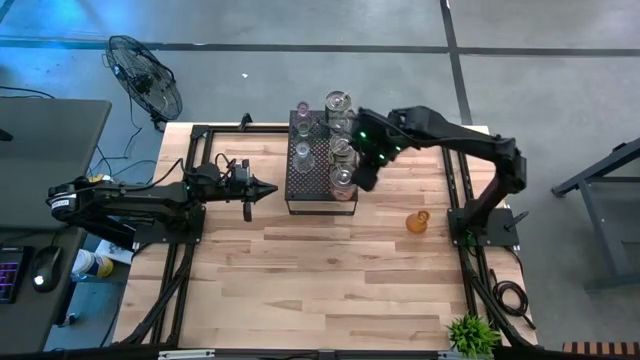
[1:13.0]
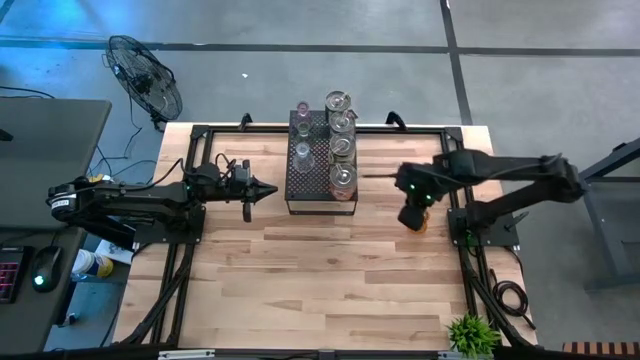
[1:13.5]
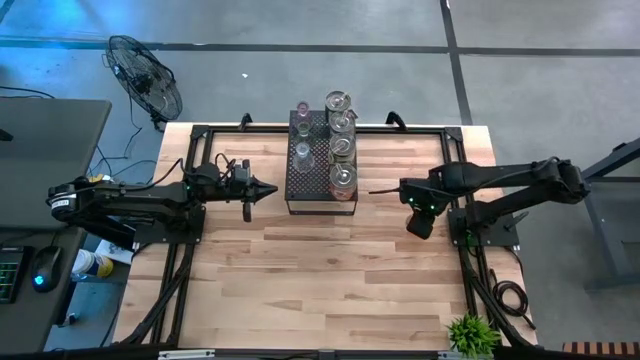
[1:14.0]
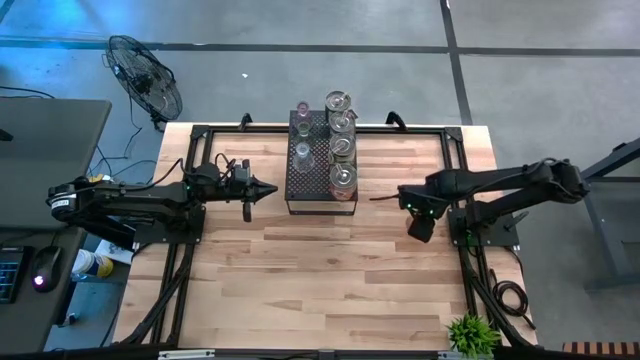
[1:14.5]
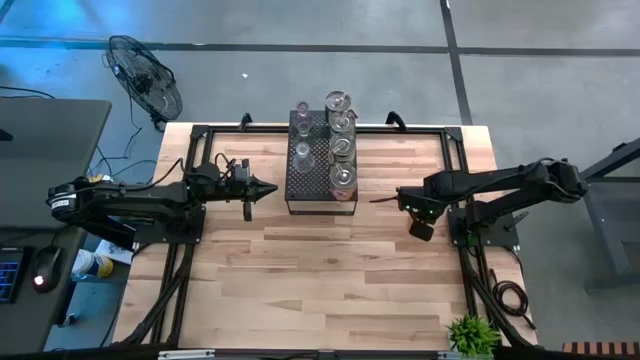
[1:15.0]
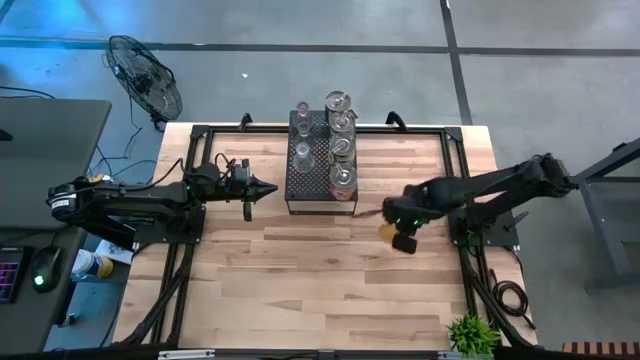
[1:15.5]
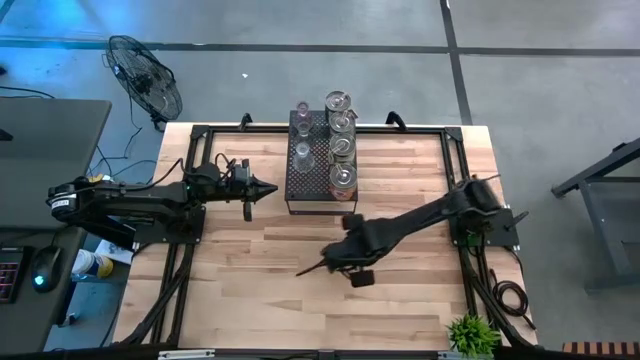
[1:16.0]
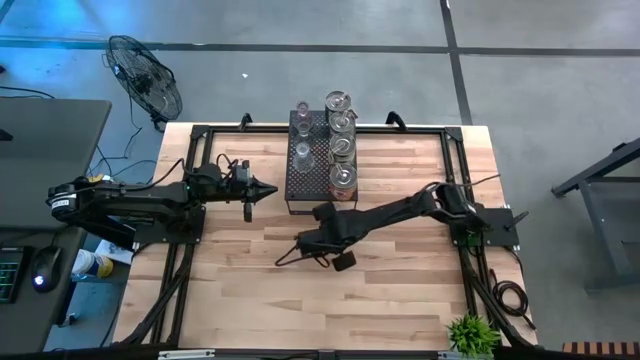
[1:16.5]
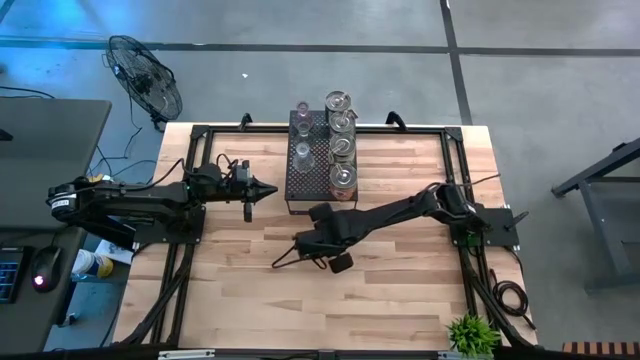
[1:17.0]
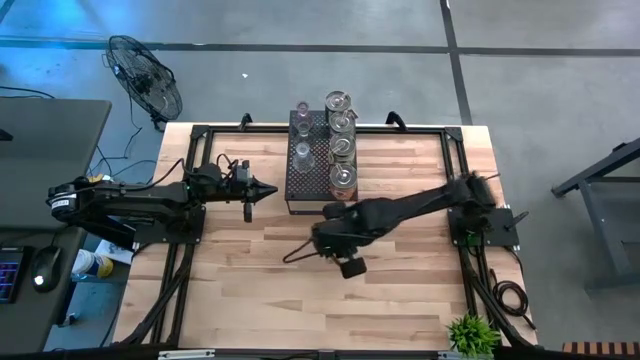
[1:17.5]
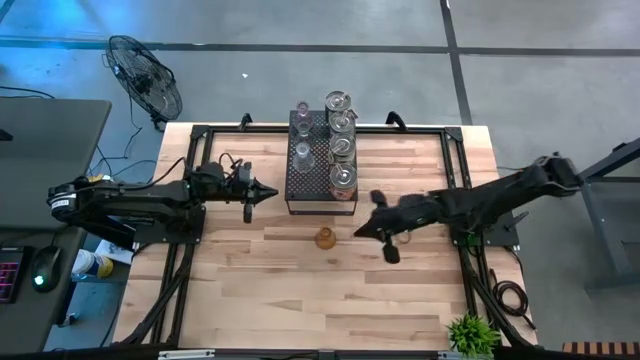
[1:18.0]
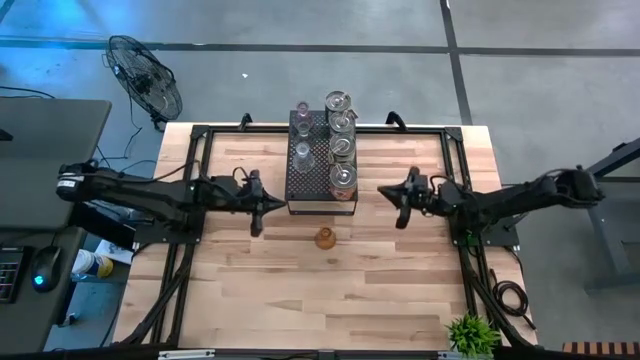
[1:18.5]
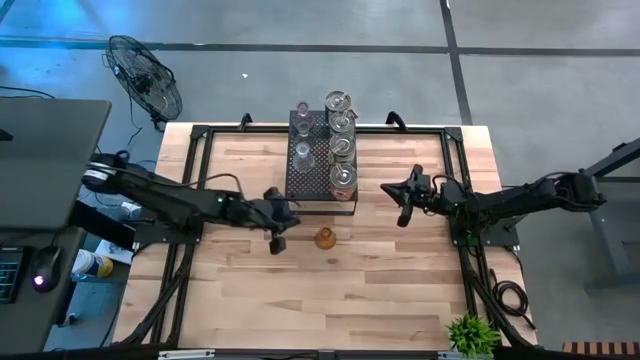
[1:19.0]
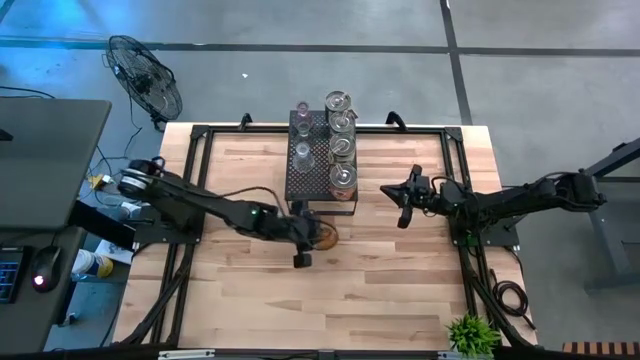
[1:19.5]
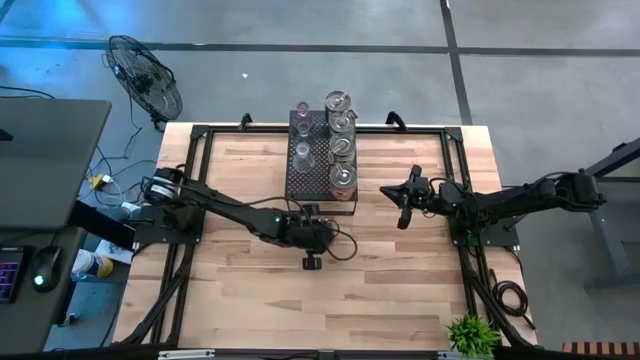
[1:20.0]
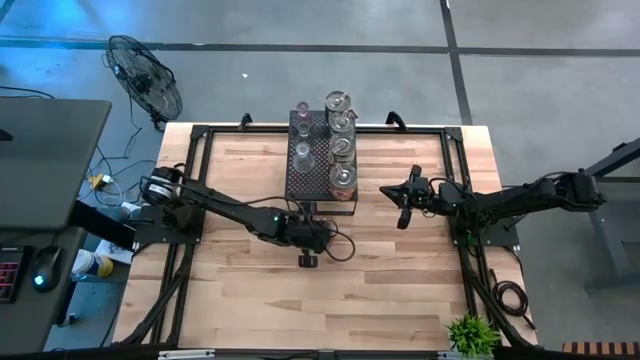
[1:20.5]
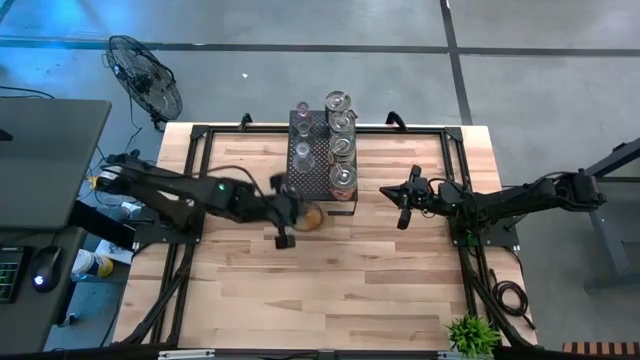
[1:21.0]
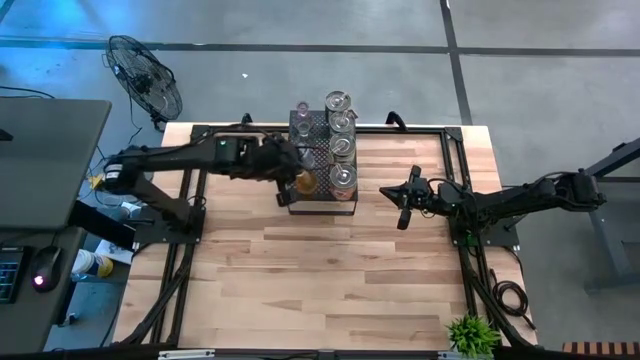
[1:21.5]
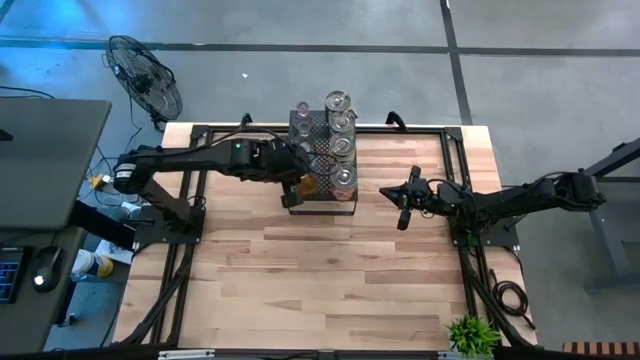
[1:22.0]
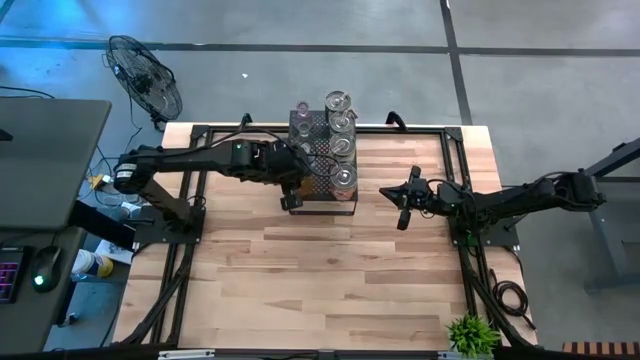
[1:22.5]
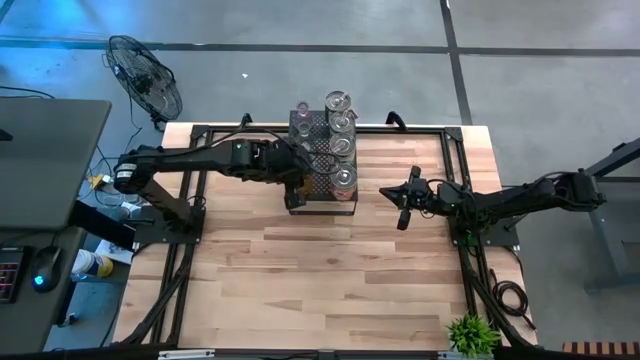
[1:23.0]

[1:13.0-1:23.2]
Task: Pick & Place candle stick holders
Put the yellow glass candle holder on the shelf

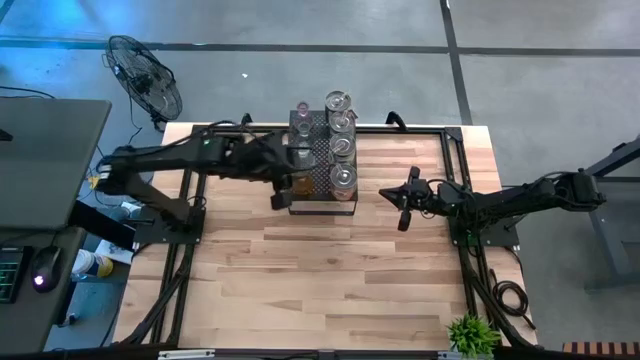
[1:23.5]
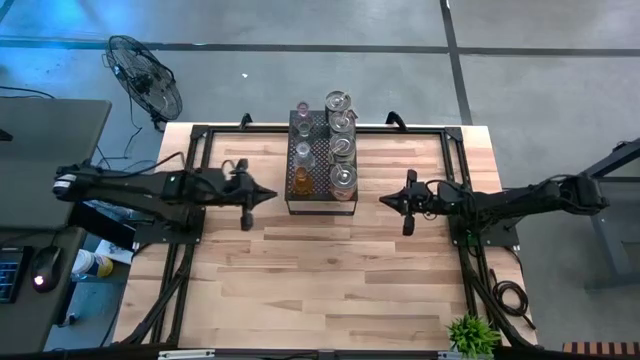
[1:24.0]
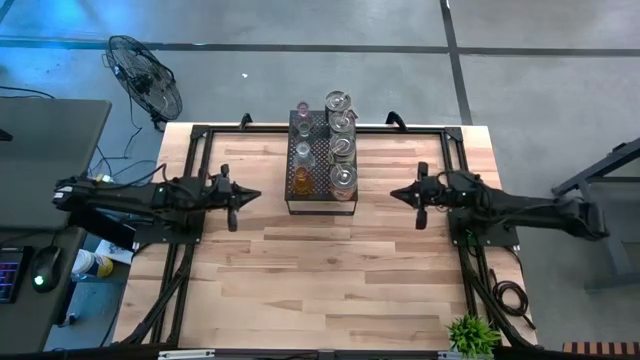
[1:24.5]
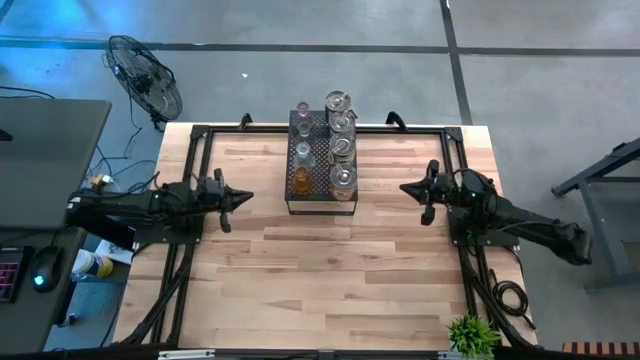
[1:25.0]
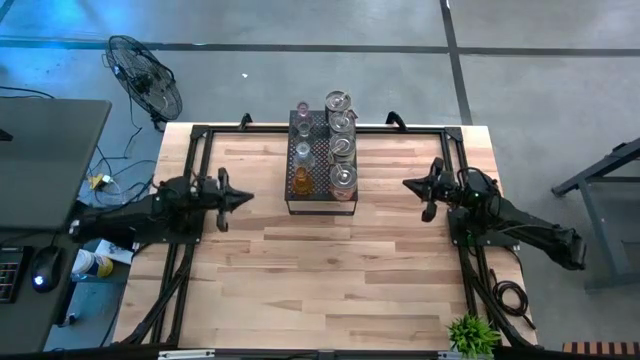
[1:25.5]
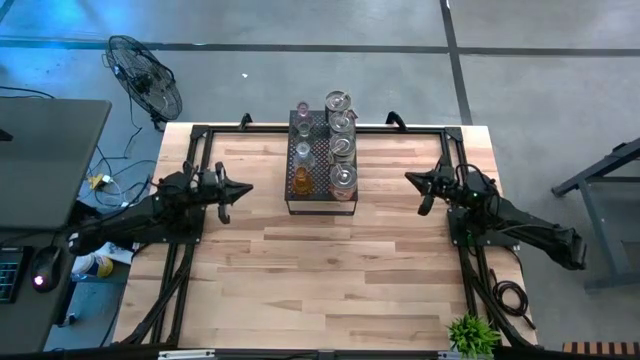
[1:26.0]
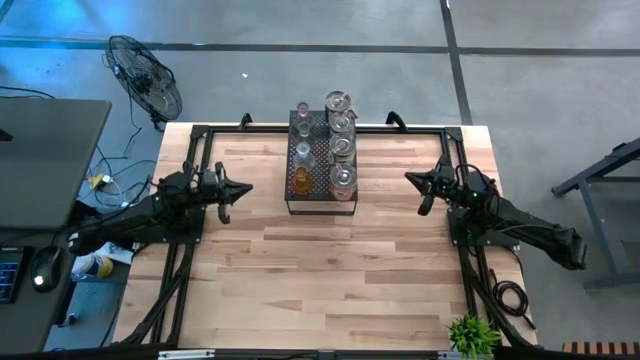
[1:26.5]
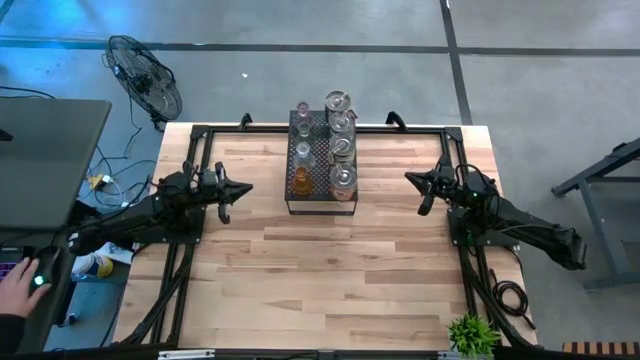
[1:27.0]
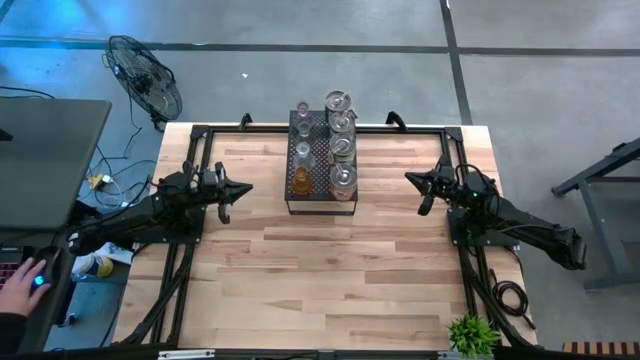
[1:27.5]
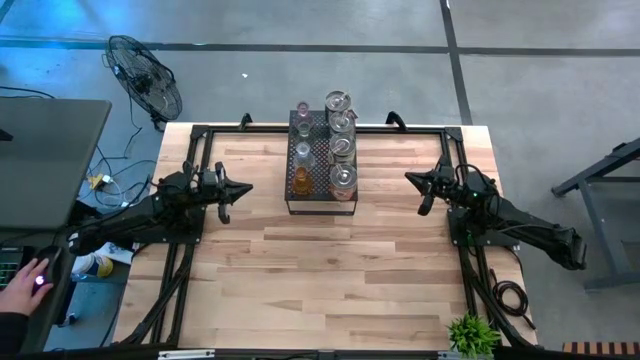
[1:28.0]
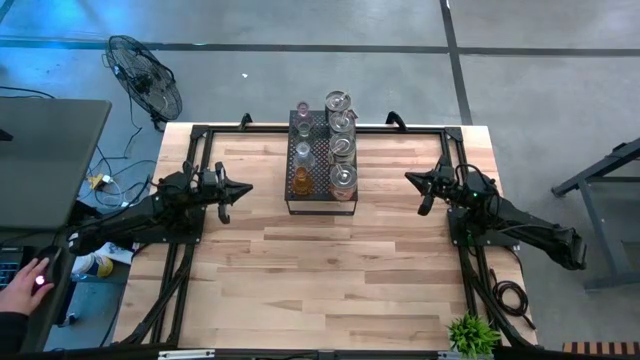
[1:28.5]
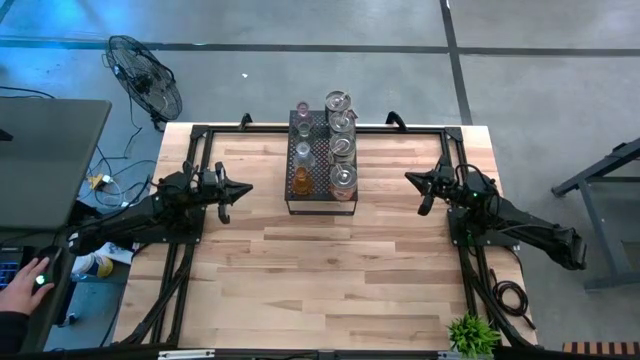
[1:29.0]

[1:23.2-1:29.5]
Return to Home Position

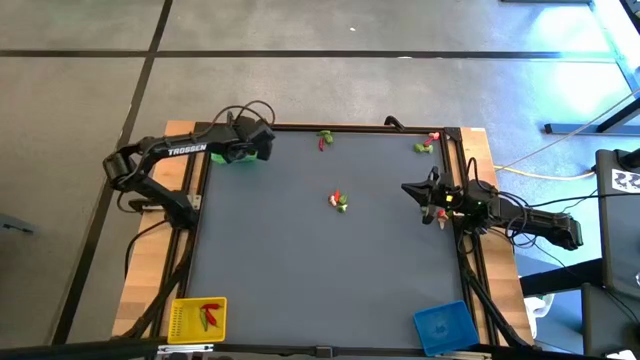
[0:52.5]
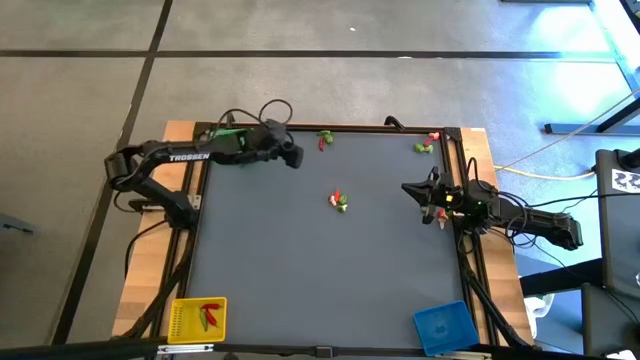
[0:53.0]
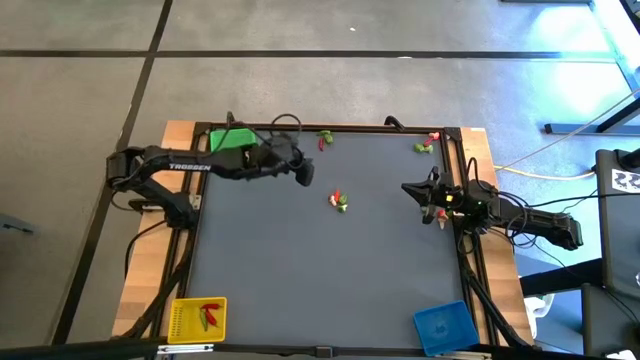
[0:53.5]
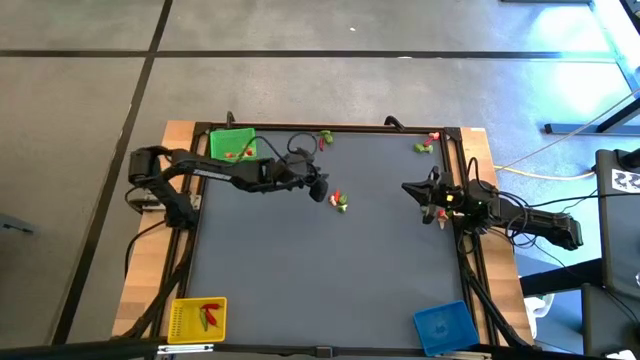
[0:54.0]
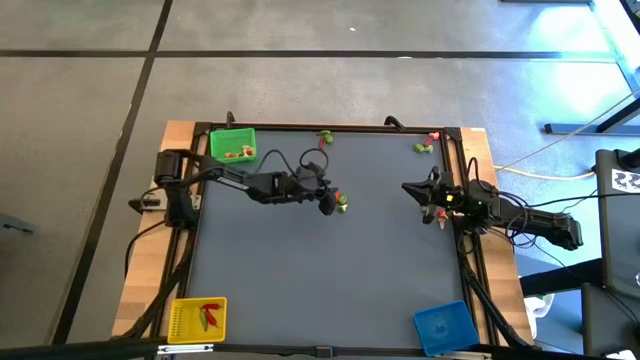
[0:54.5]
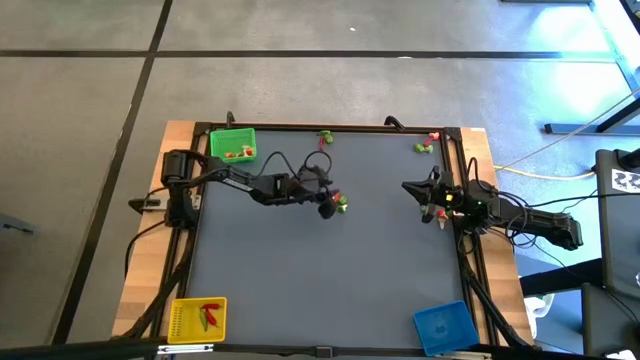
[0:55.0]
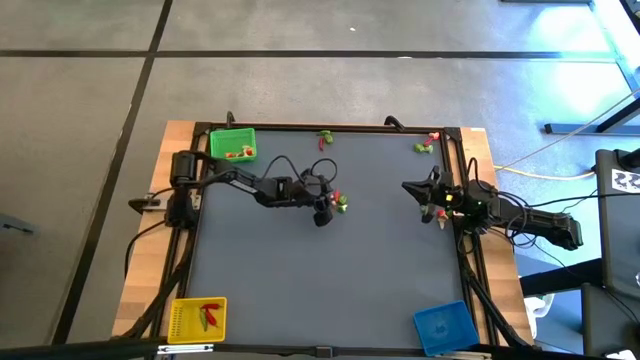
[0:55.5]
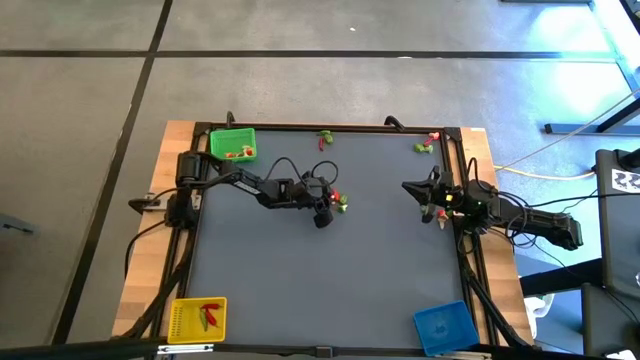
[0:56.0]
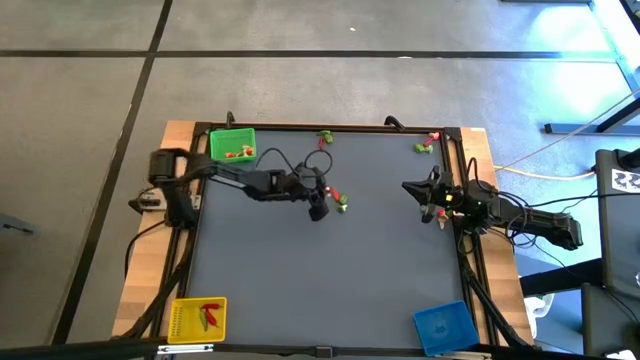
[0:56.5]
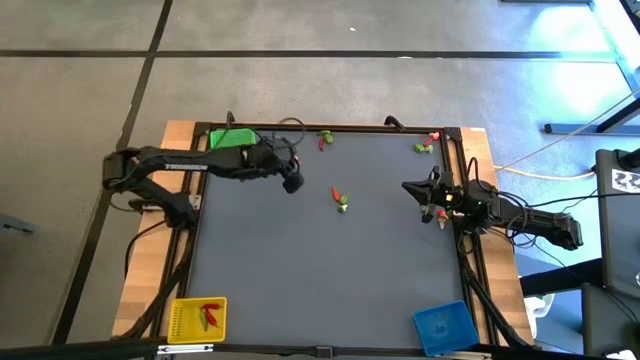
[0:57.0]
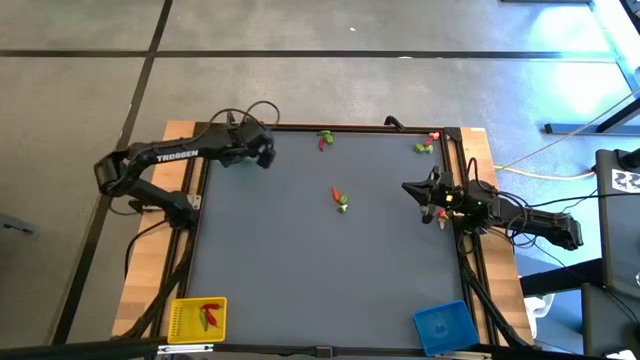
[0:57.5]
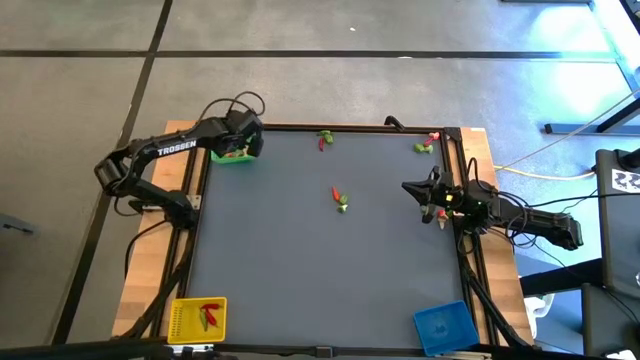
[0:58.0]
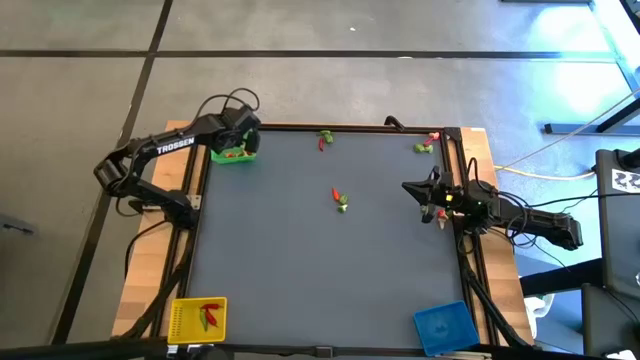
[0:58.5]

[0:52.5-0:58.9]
Task: Sort produce into baskets
Put the brown mushroom into the green bin
